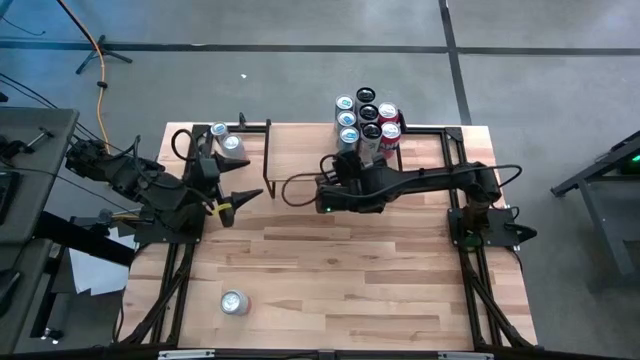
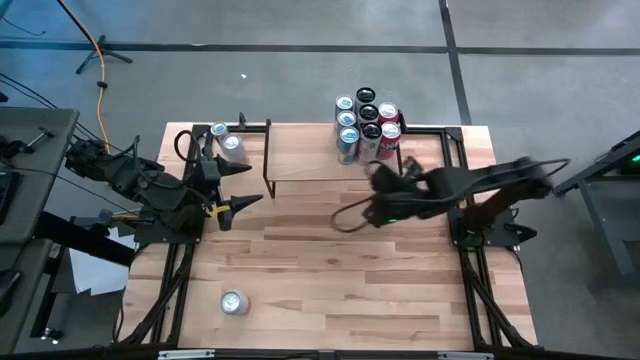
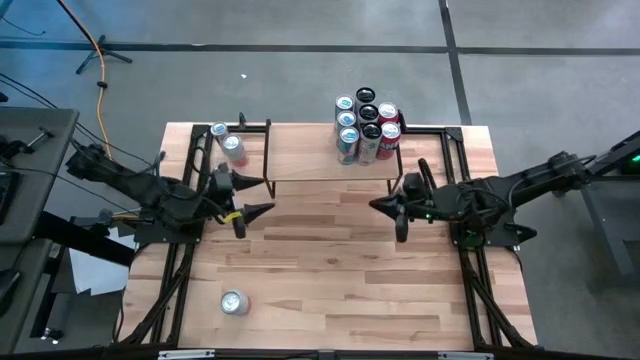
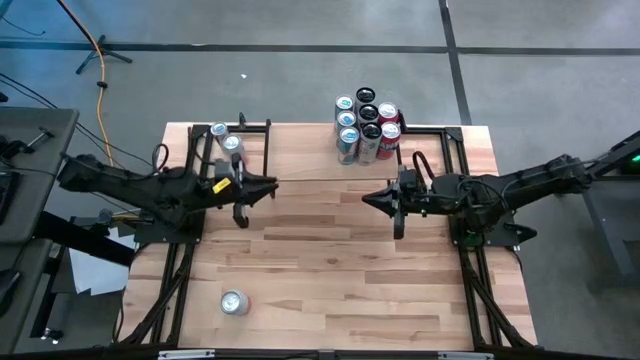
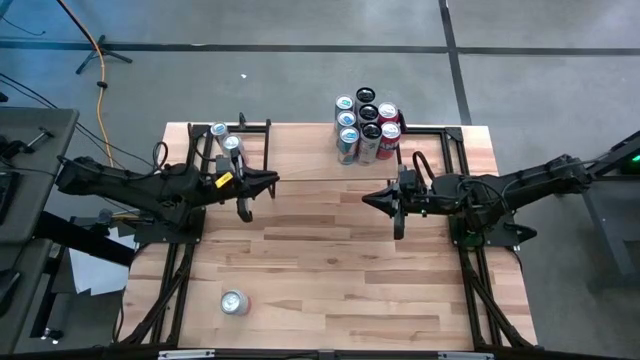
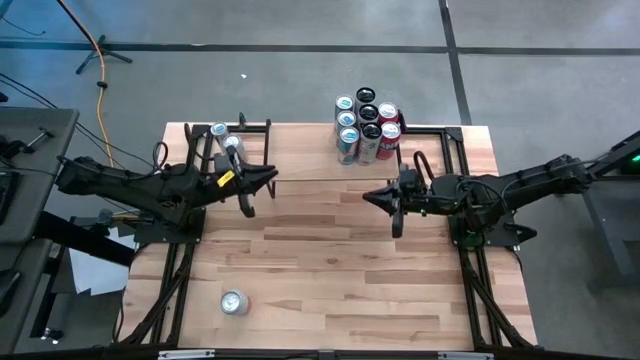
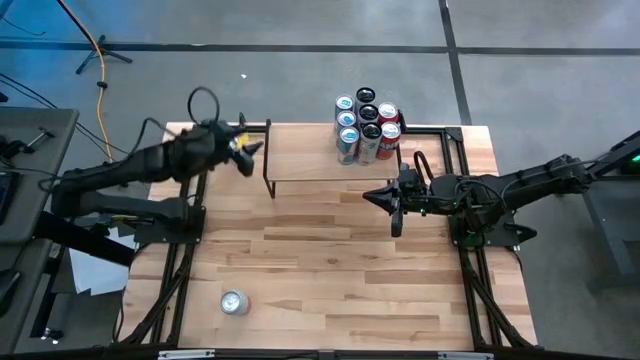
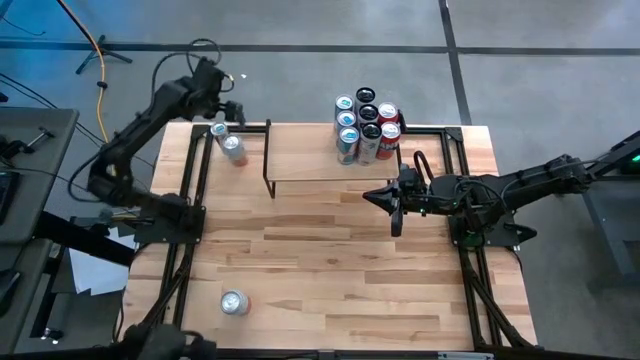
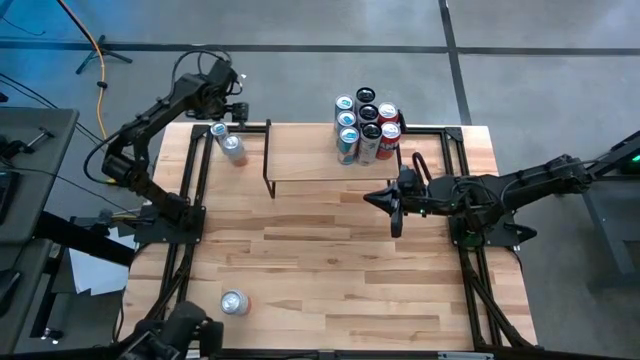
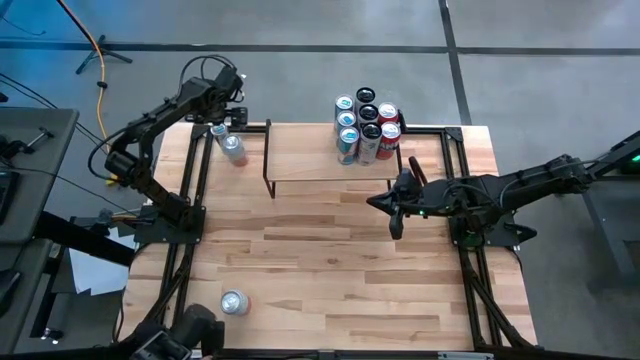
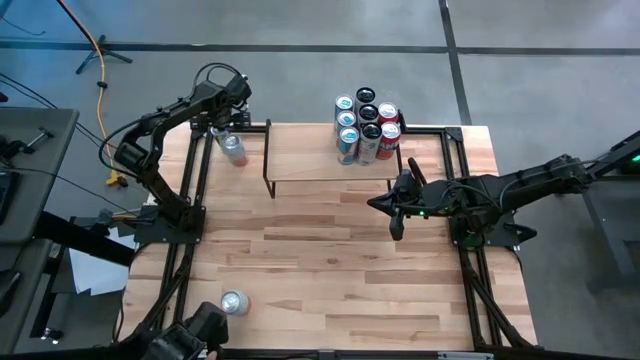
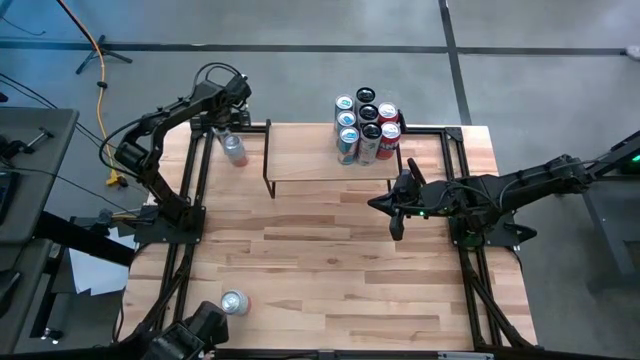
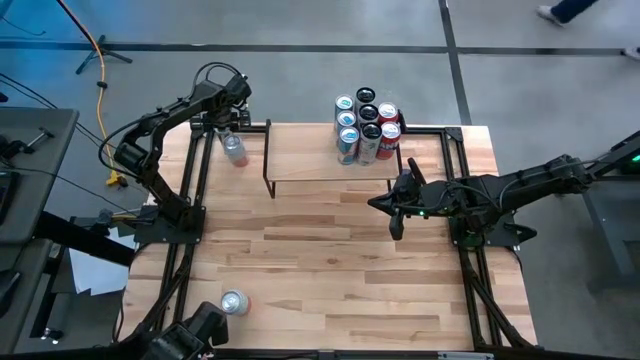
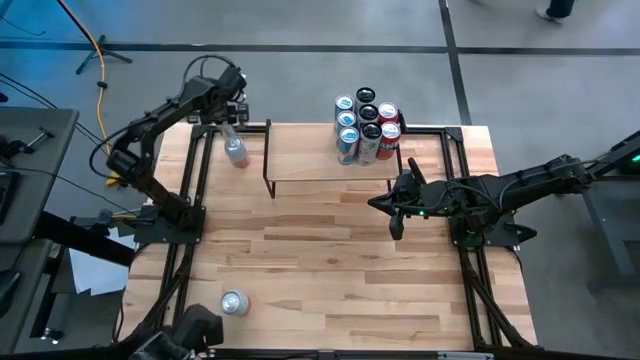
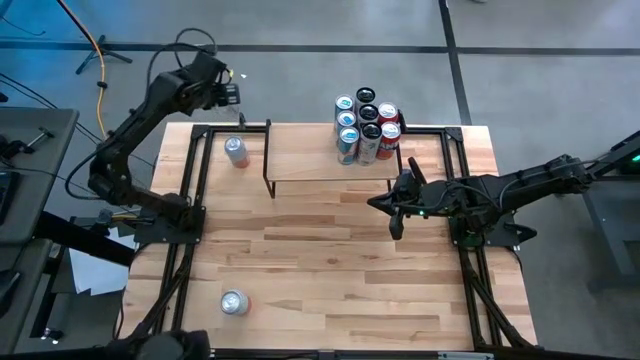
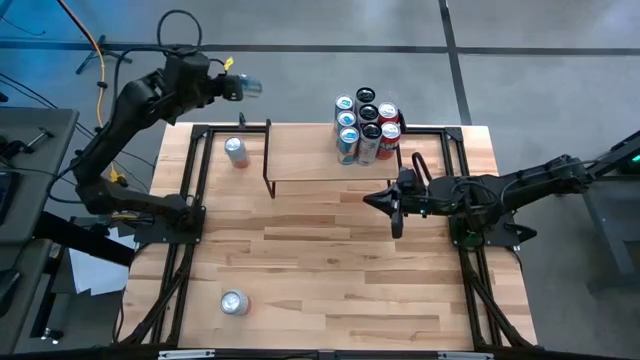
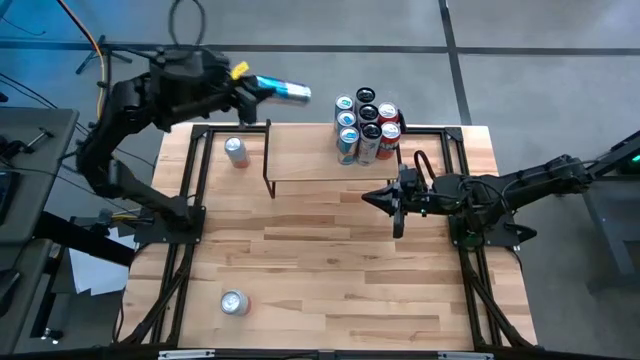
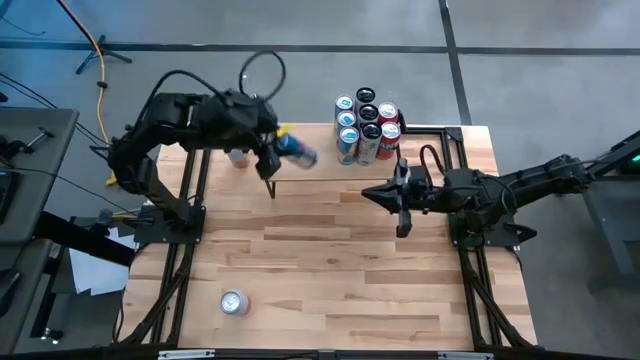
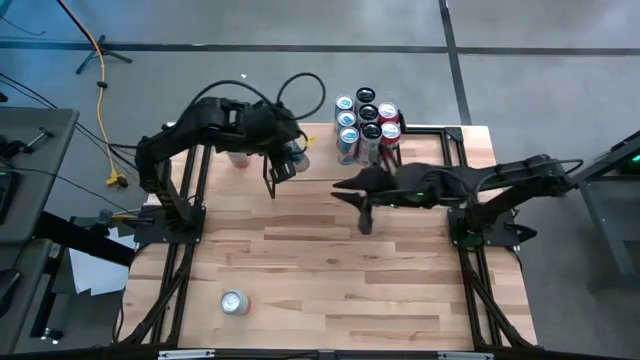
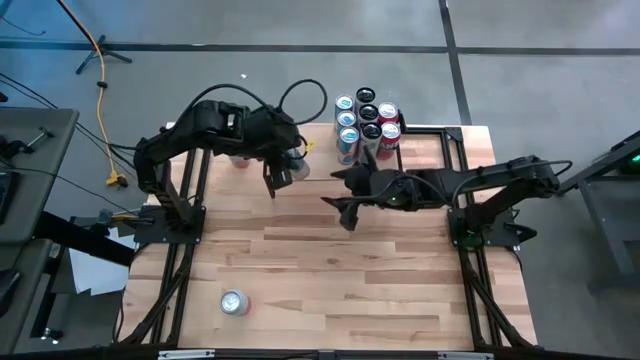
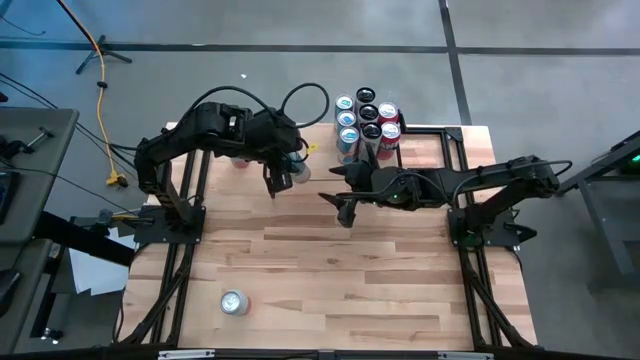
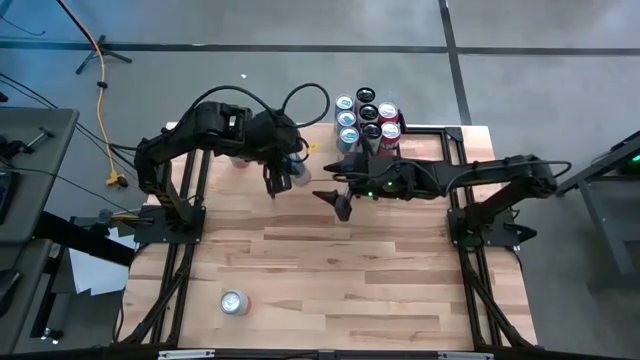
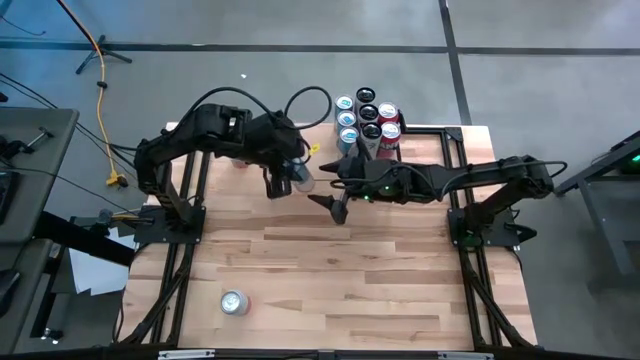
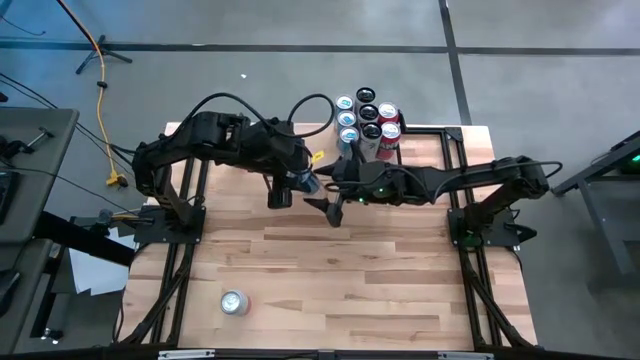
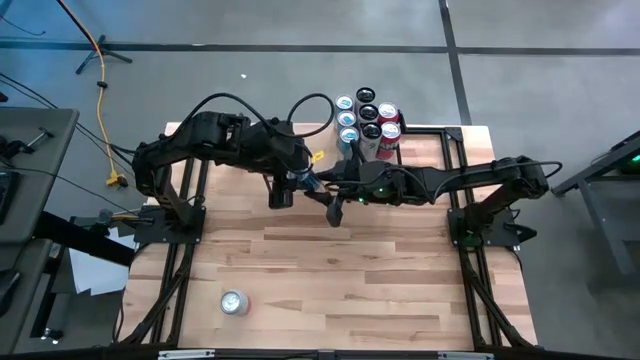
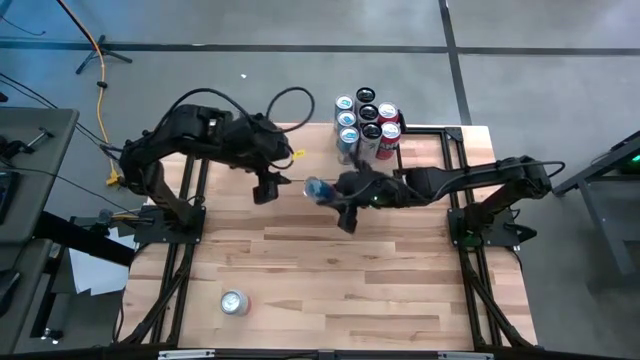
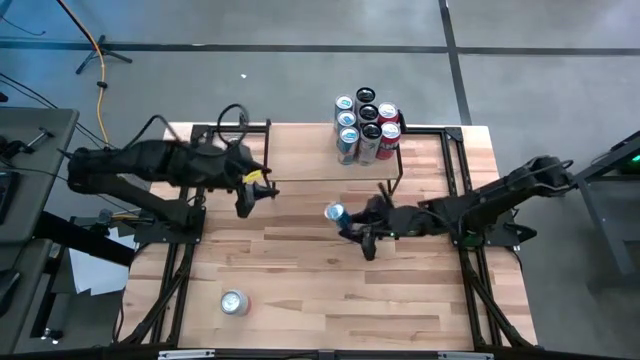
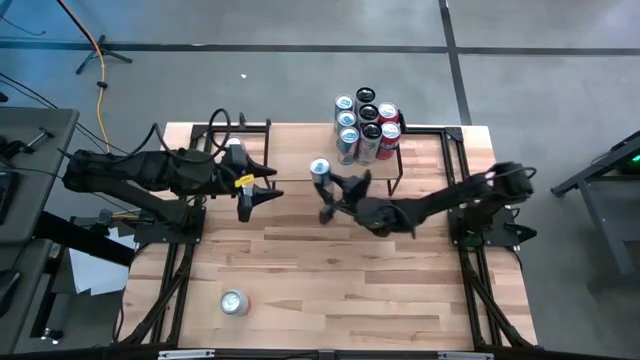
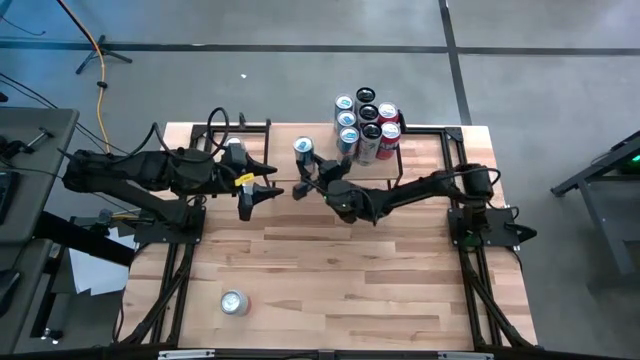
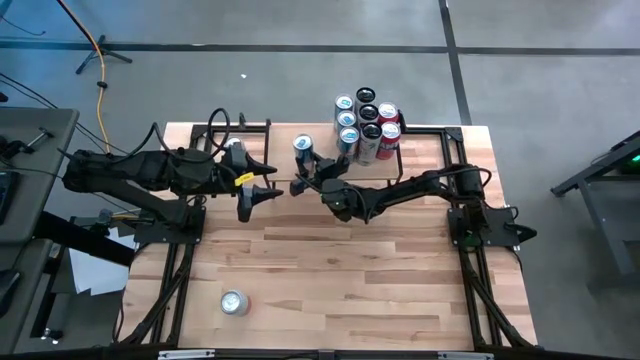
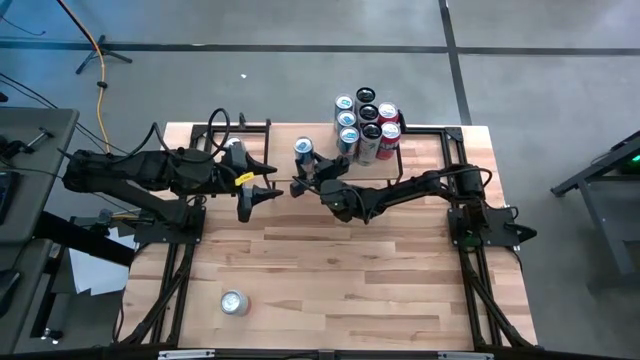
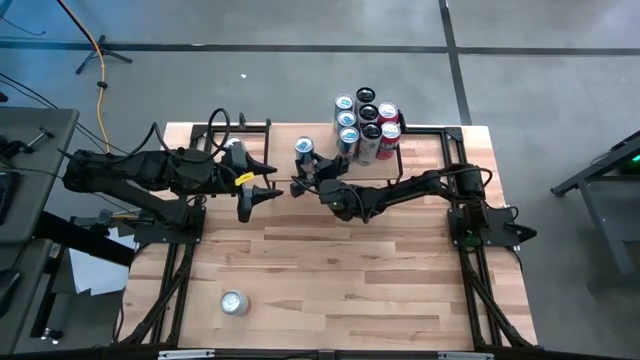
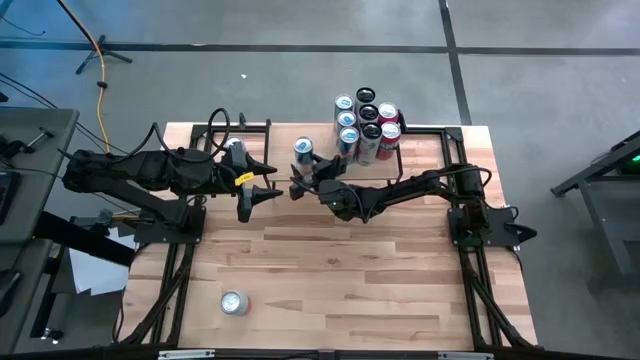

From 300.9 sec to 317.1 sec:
Task: Place canned beverage on shelf
Put the blue soda can on the shelf aligned with the blue soda can

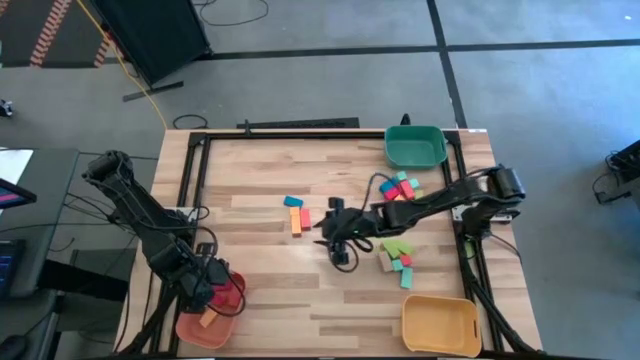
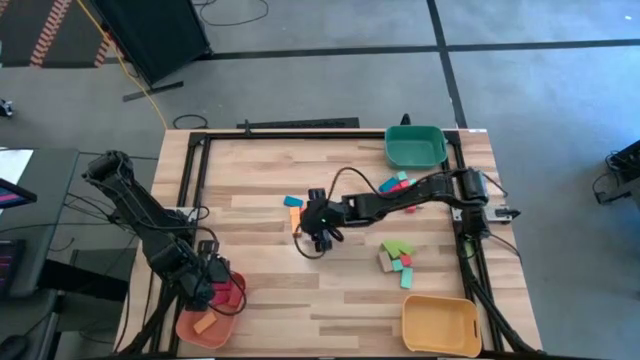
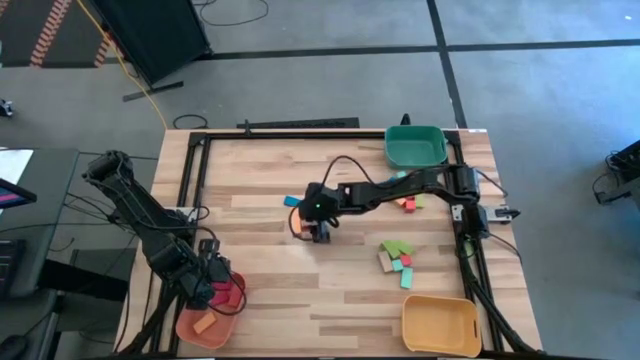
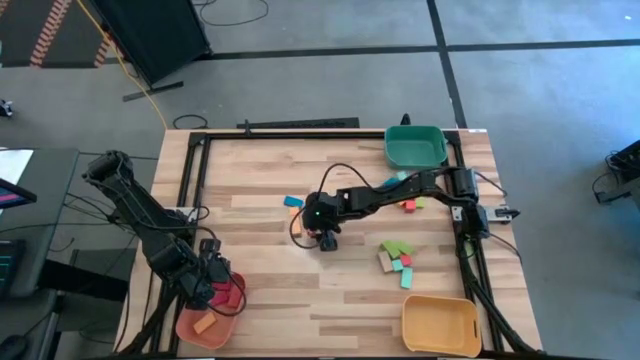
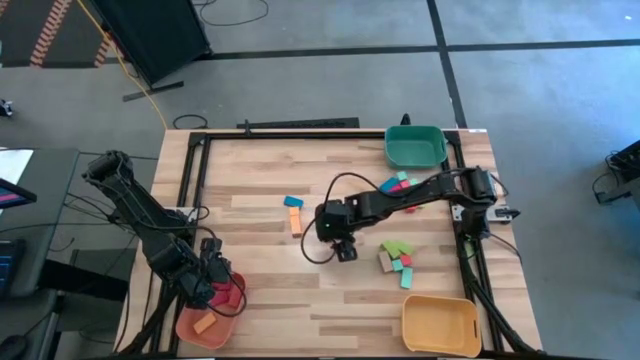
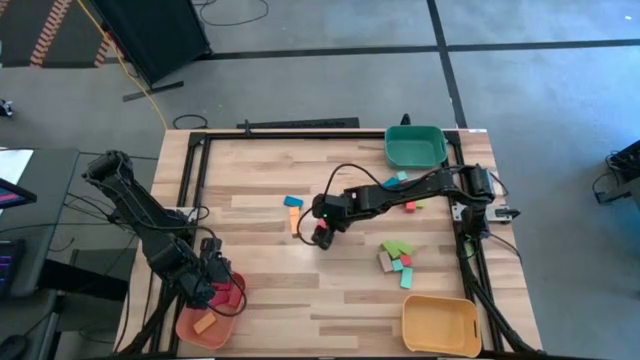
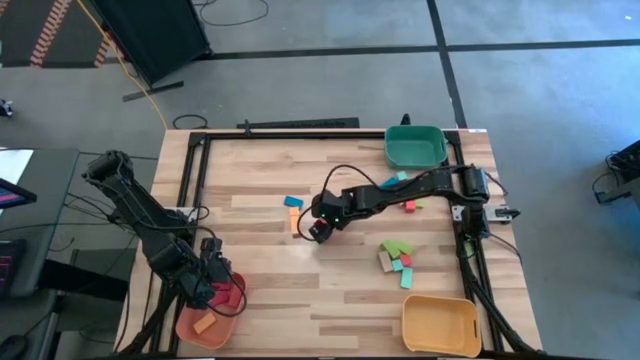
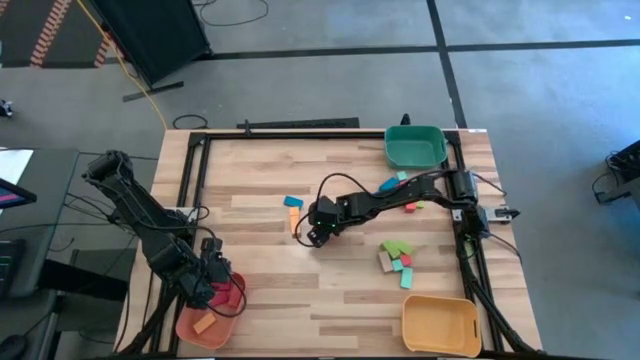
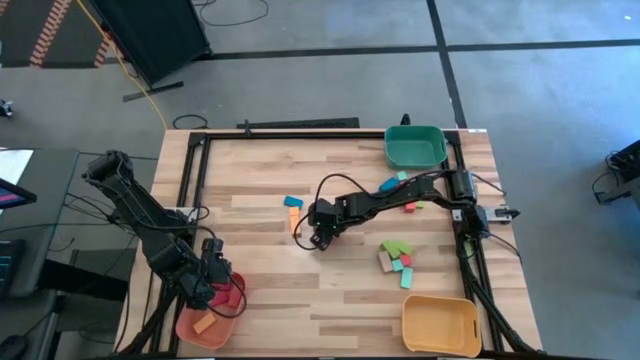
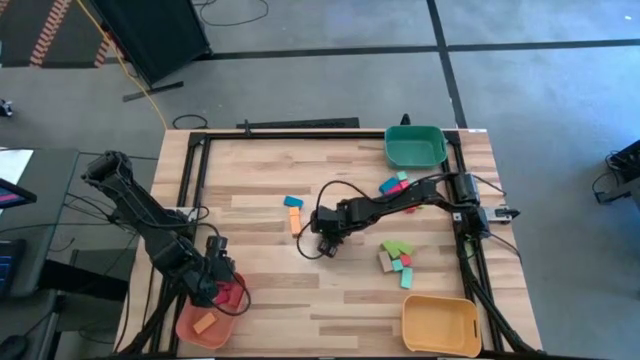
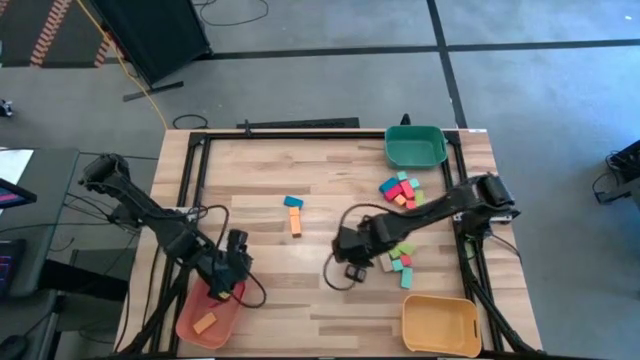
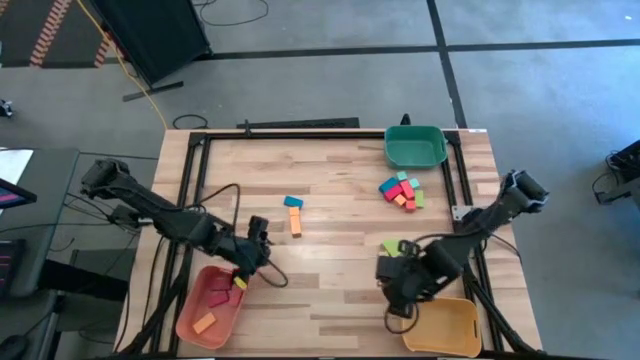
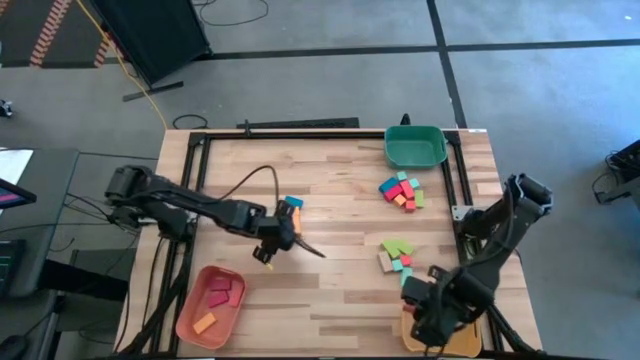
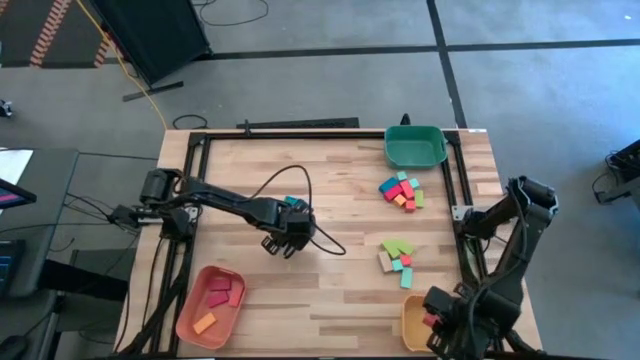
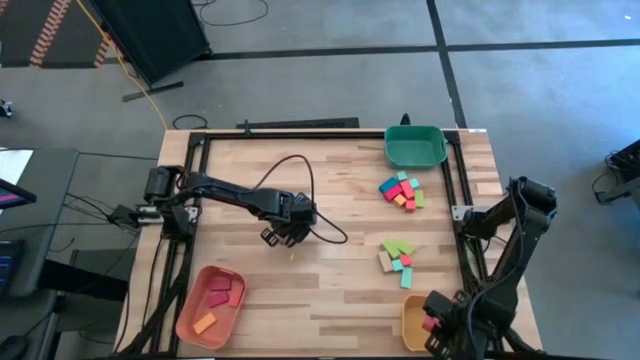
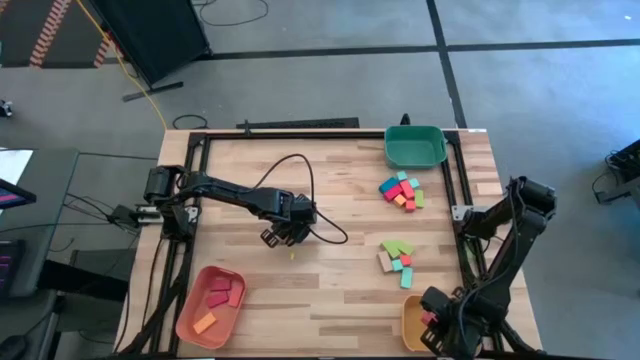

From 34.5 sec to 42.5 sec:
Task: Sort blocks by size
Put the large red rectangular block into the yellow bin
